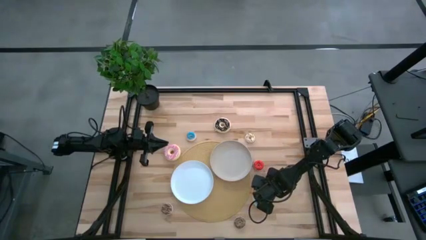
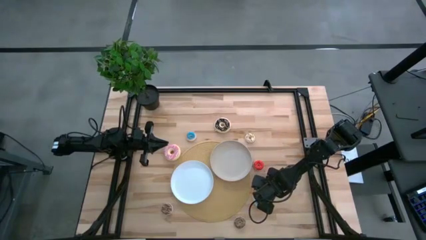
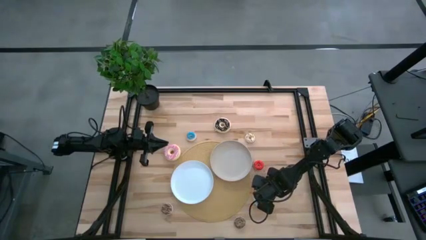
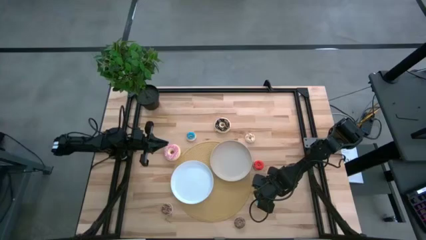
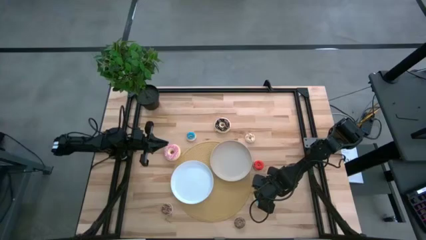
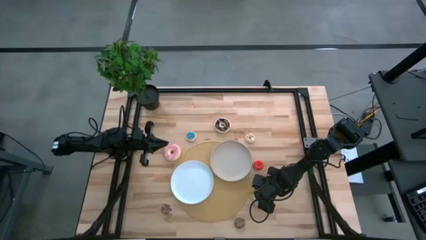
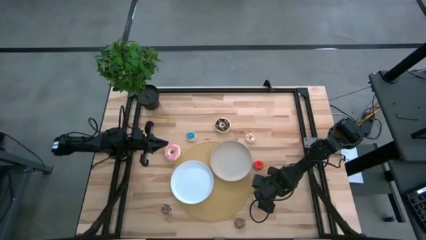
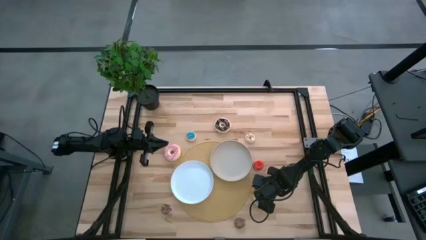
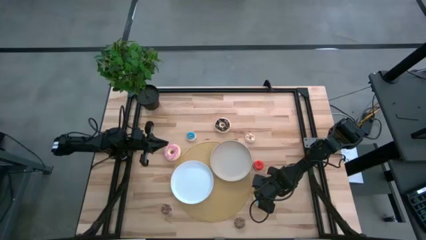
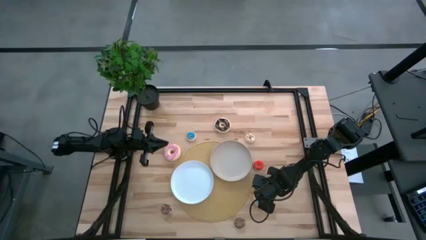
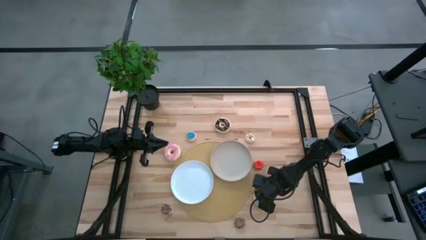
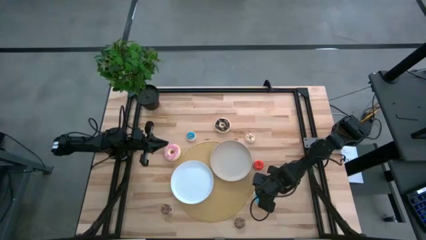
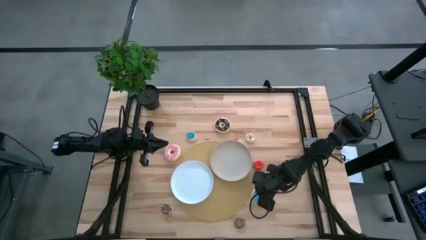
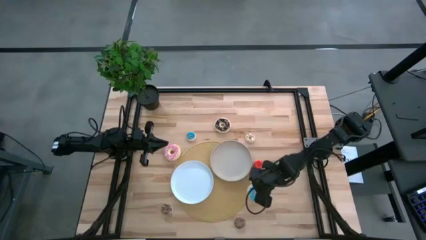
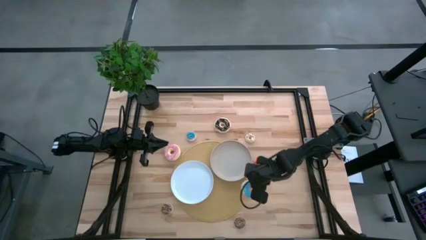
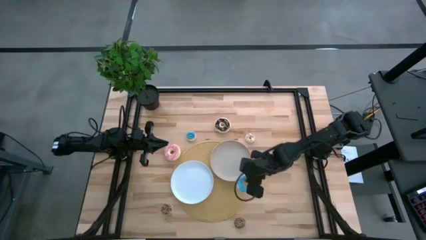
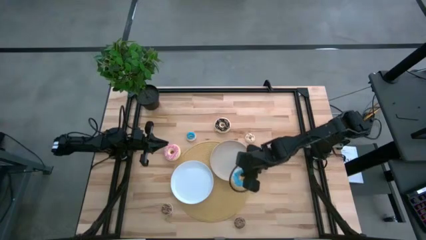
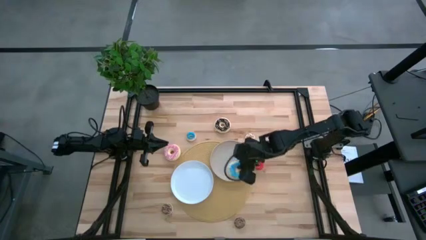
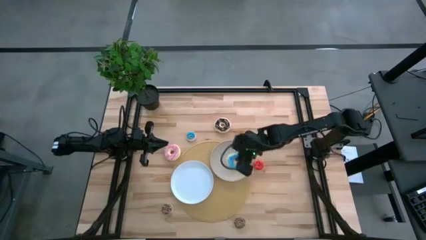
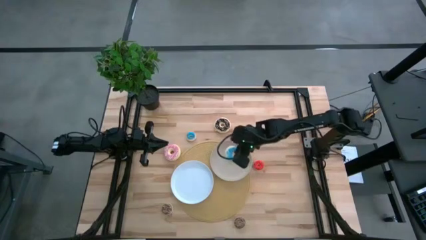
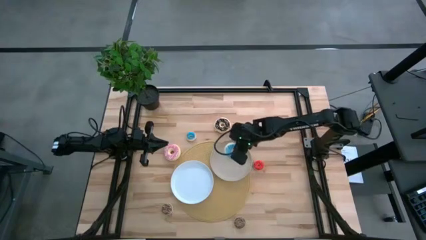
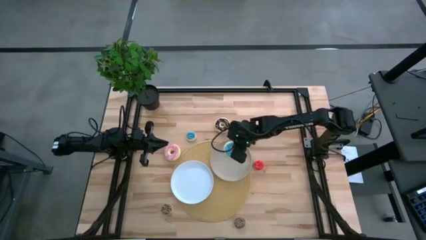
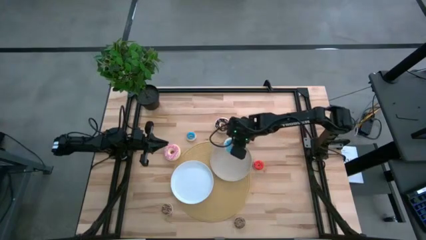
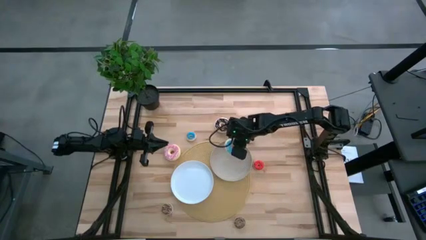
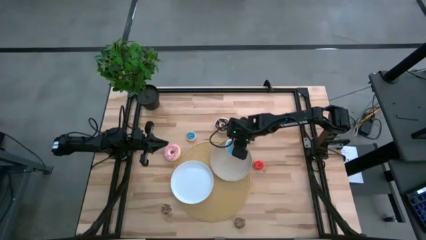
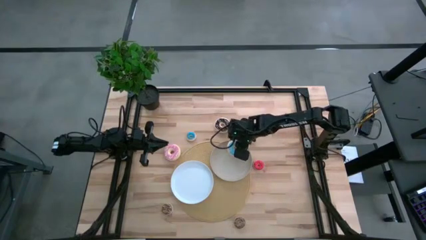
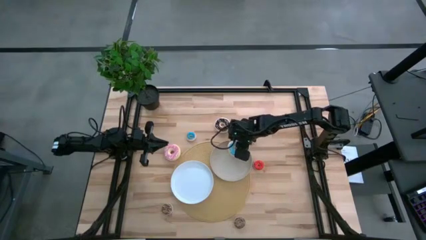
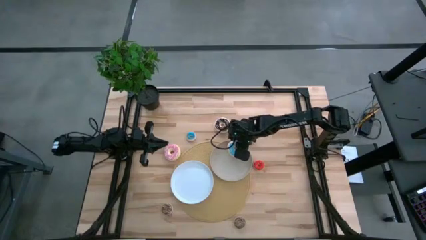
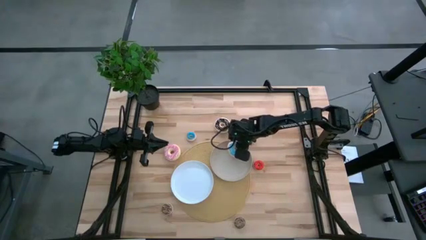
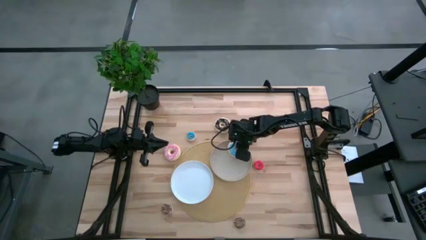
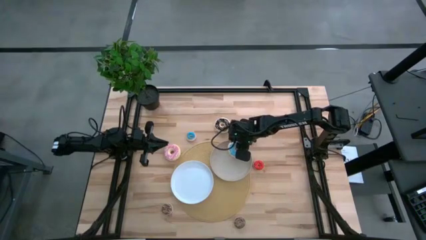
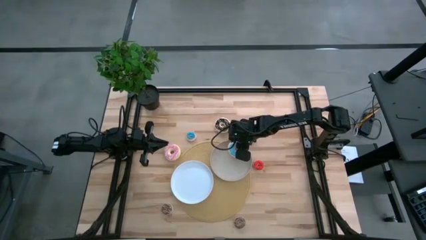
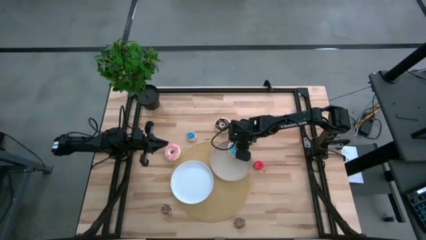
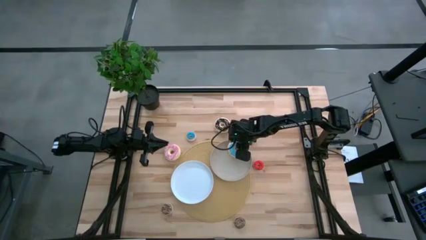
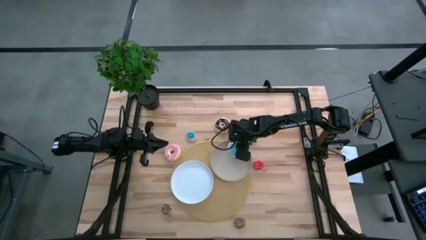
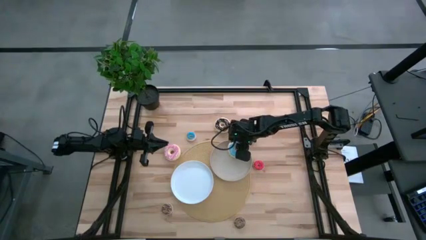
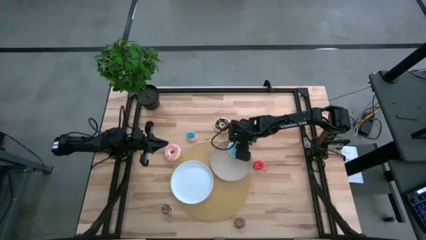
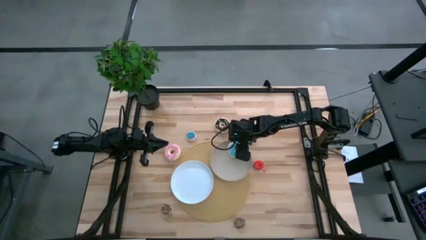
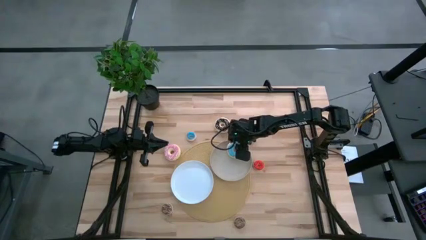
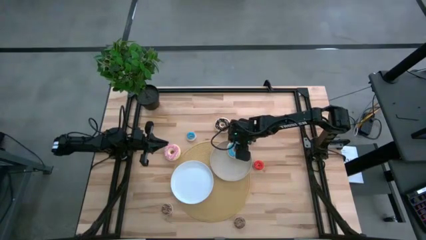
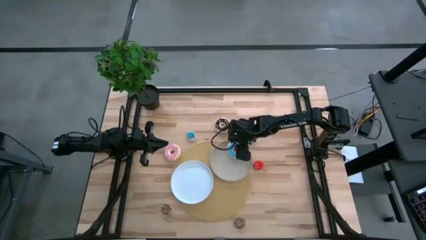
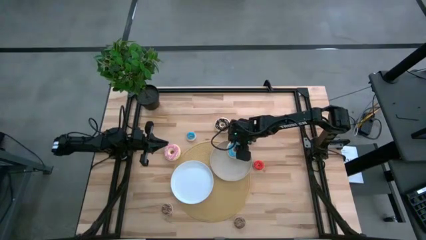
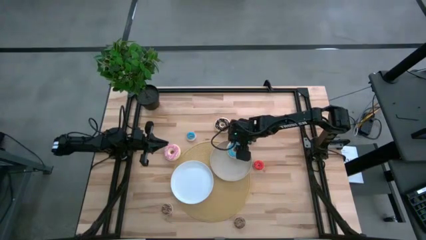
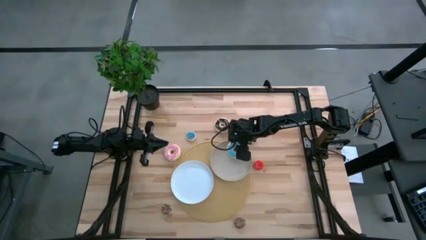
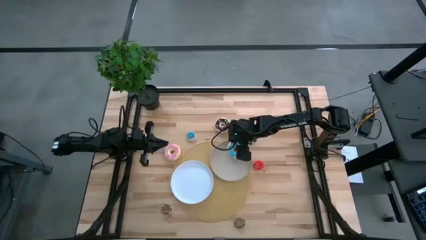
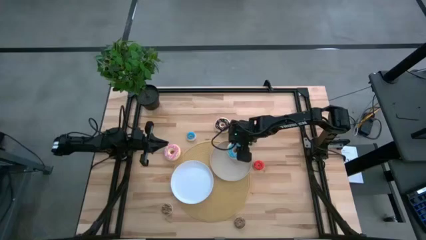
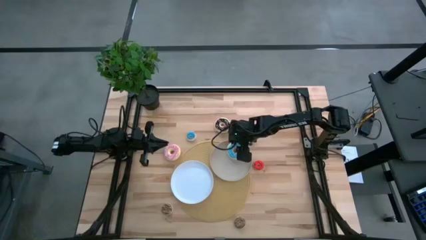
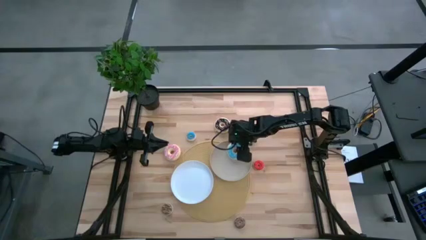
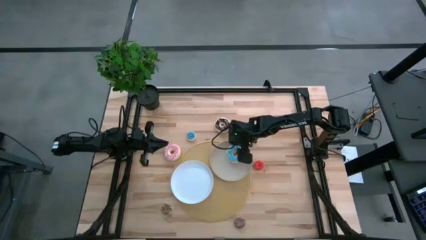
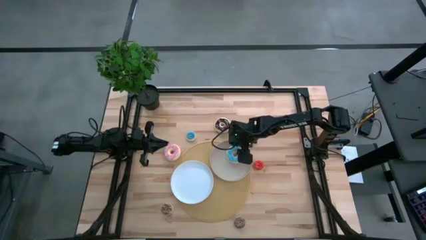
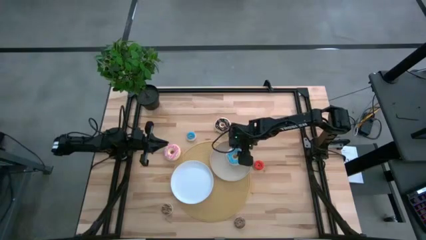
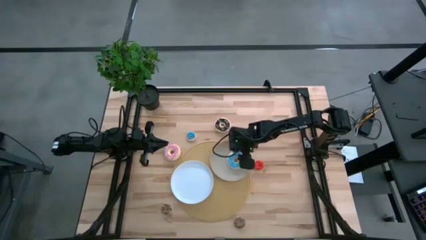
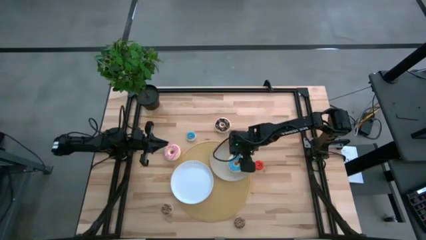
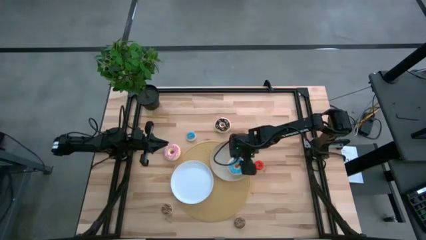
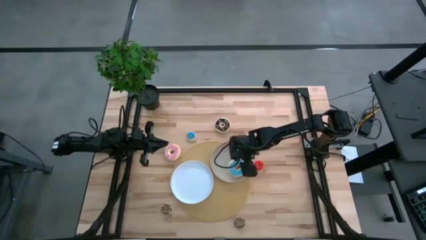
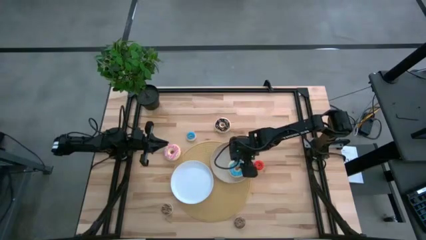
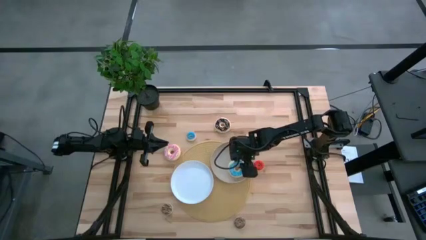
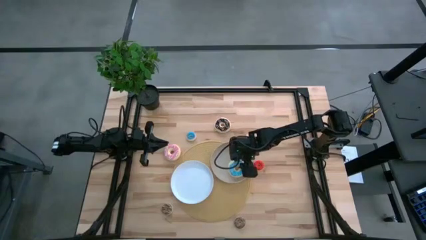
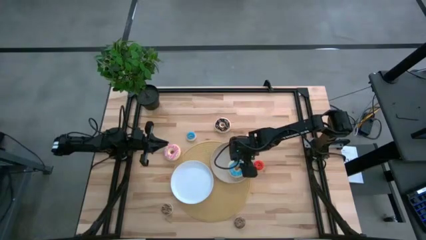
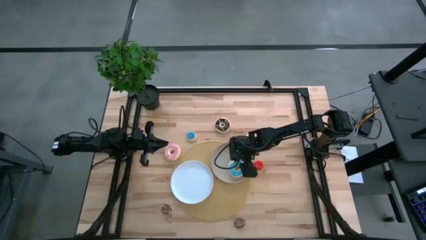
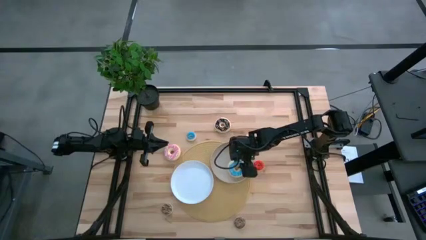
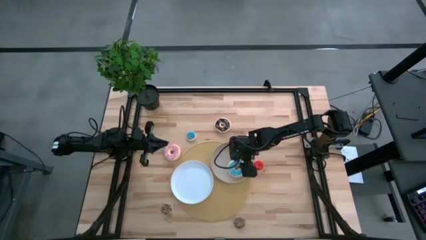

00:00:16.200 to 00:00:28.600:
Task: Pick & Place donuts
Put the large blue donut on the gray plate

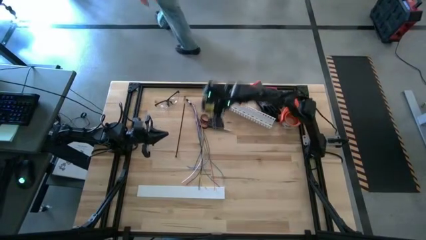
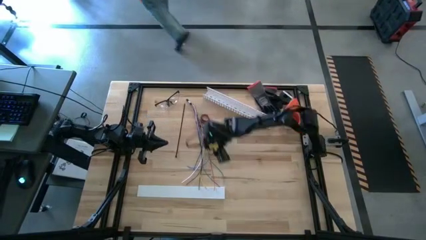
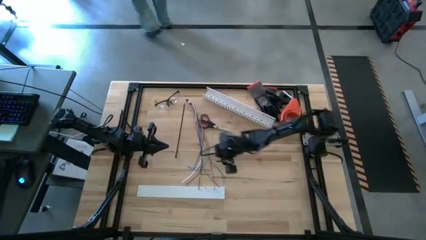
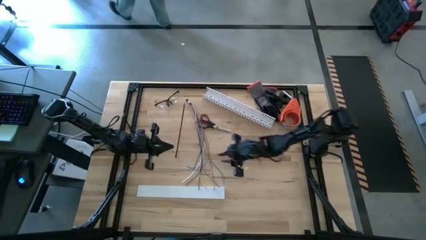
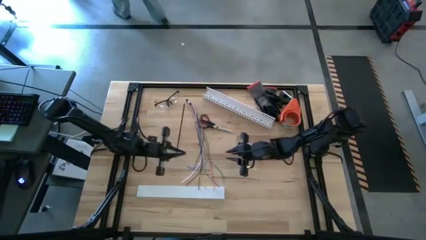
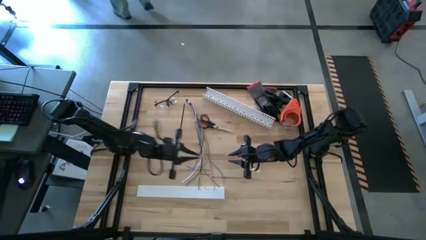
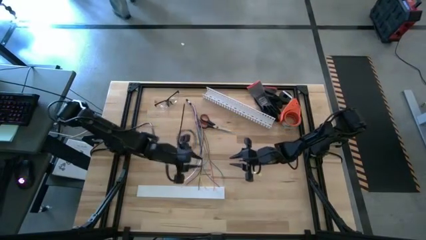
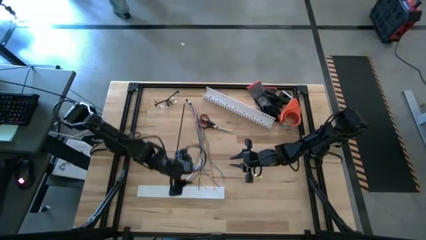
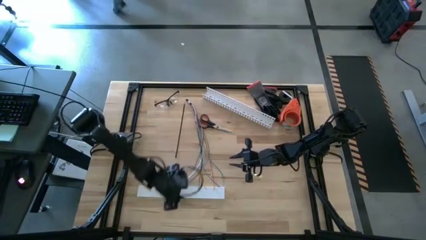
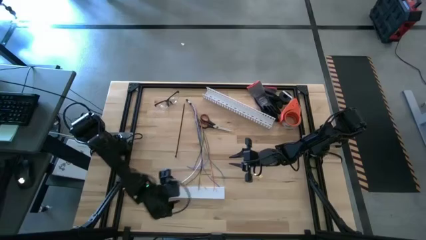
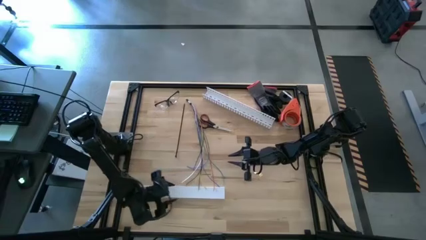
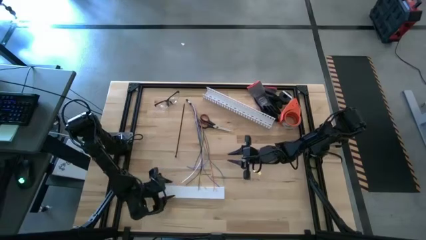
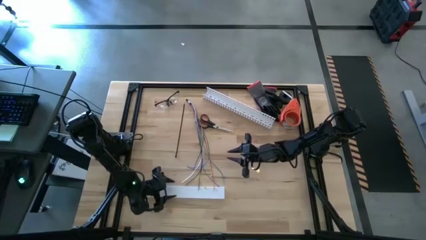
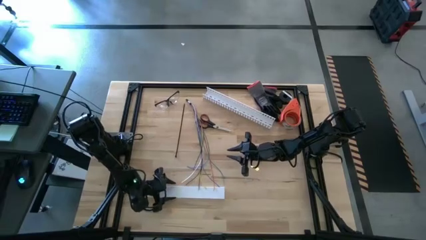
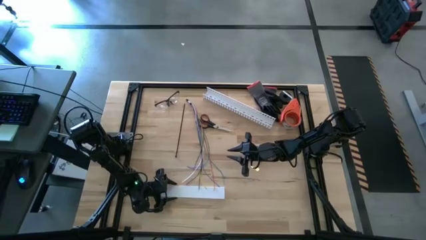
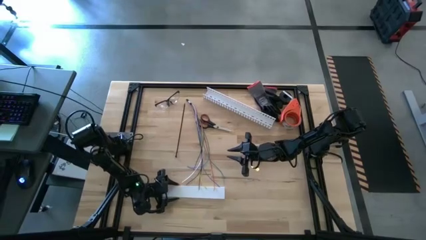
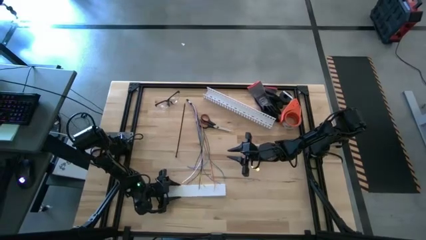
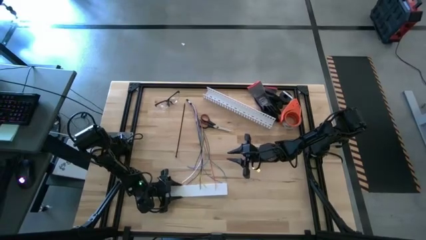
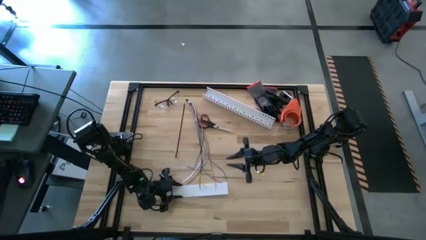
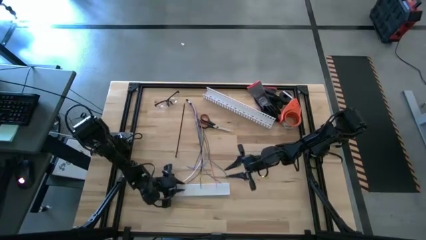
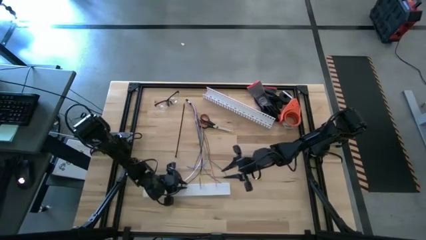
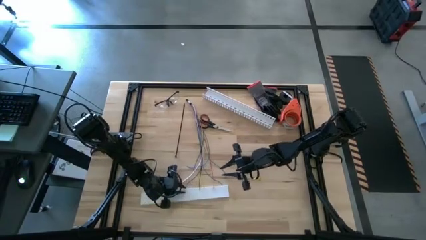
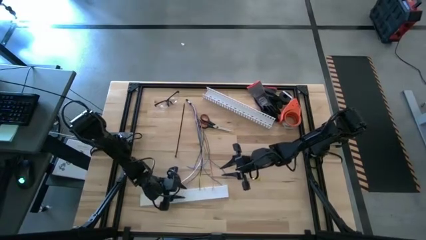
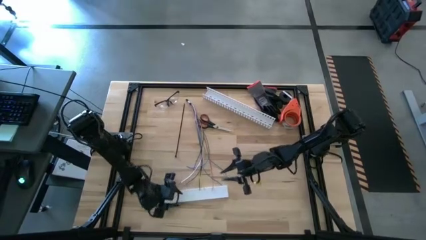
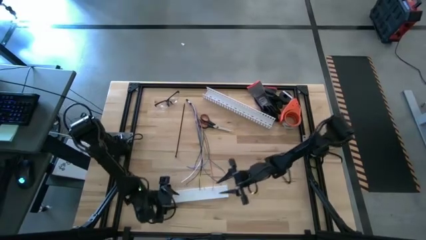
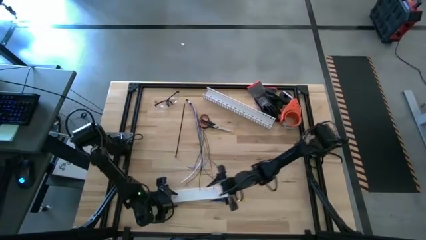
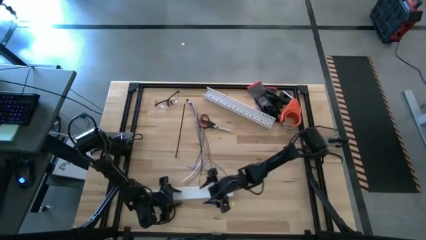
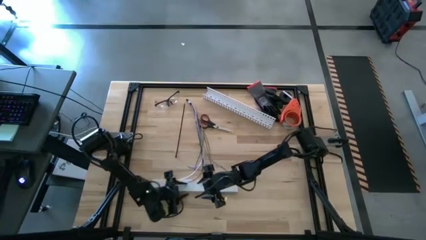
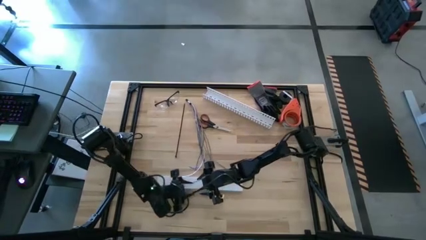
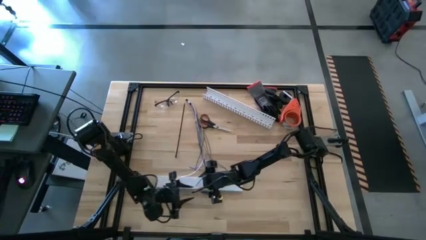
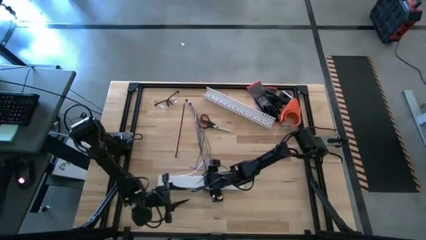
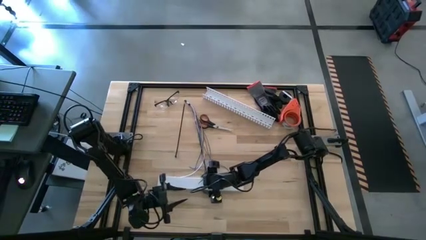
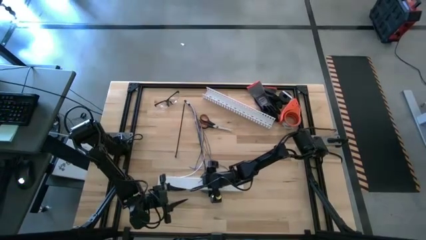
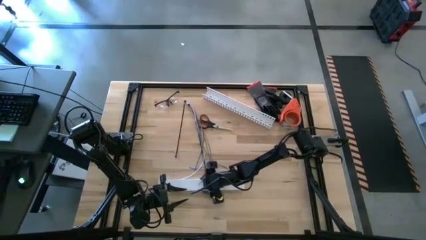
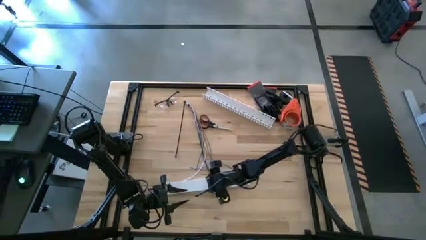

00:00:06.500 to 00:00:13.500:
Task: Ziptie cables
Move the white cable duct lid to the middle right of the table
